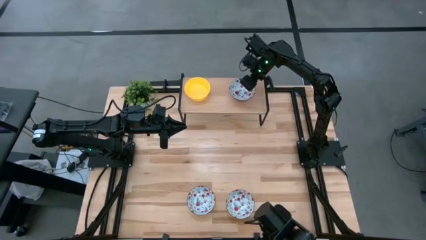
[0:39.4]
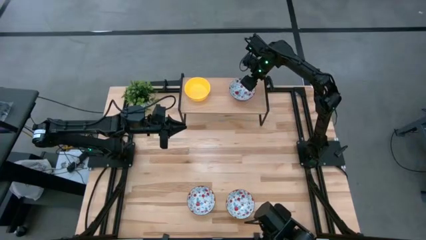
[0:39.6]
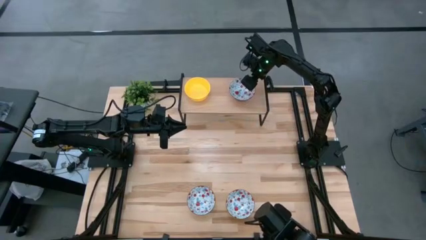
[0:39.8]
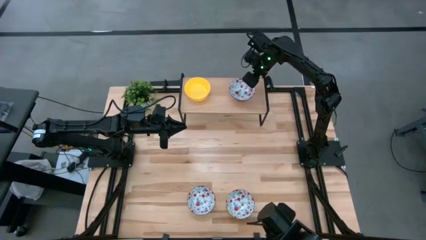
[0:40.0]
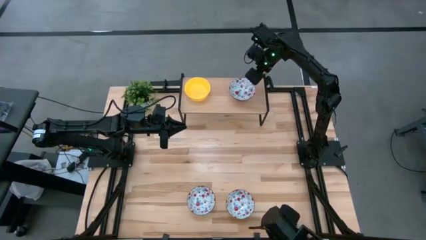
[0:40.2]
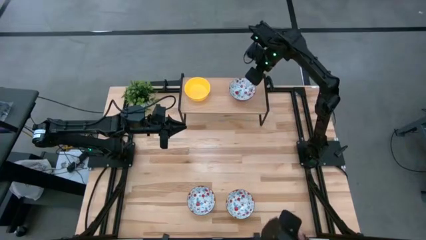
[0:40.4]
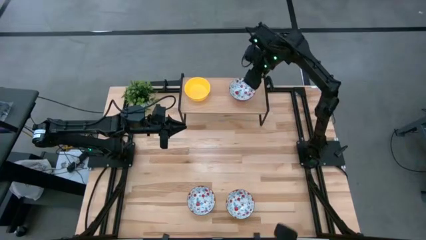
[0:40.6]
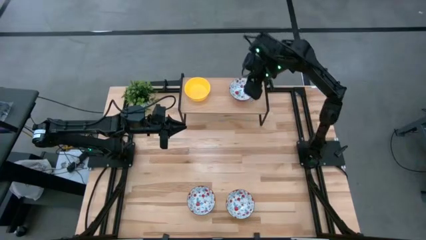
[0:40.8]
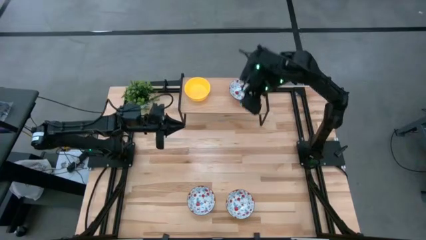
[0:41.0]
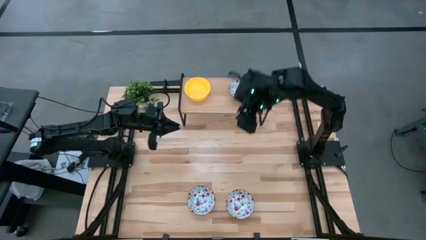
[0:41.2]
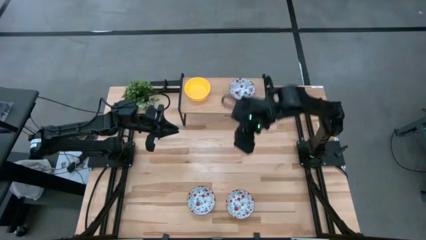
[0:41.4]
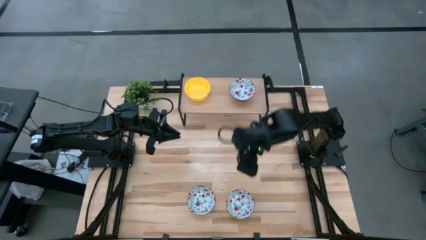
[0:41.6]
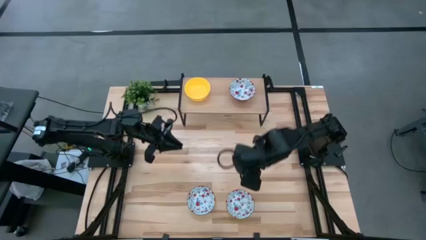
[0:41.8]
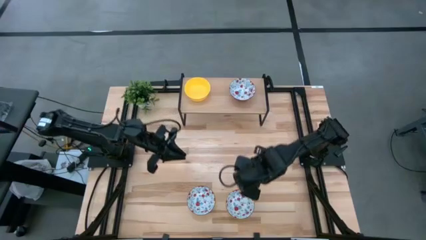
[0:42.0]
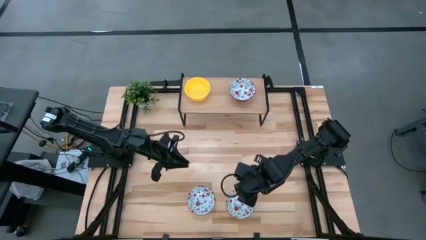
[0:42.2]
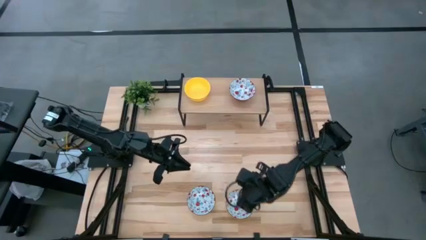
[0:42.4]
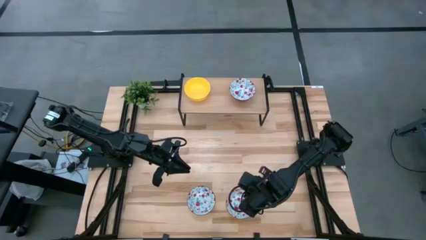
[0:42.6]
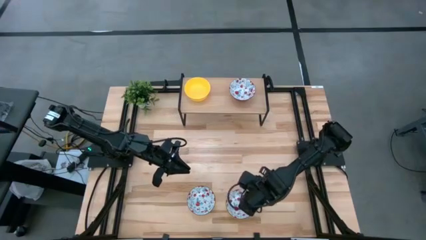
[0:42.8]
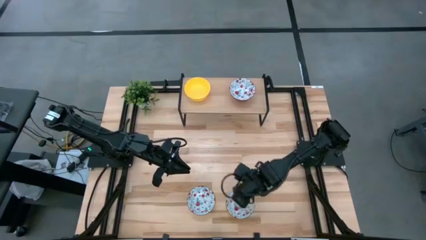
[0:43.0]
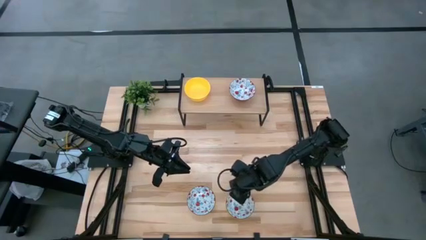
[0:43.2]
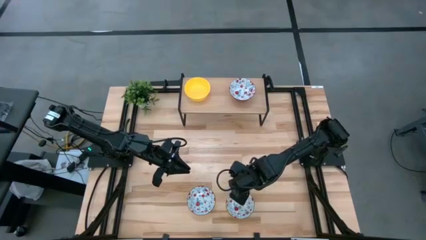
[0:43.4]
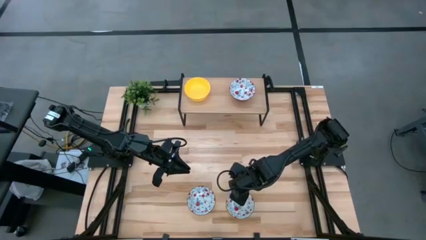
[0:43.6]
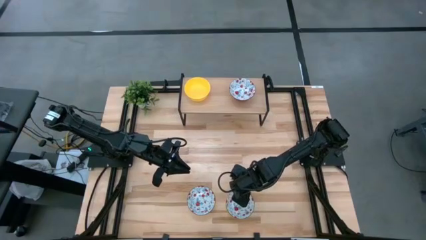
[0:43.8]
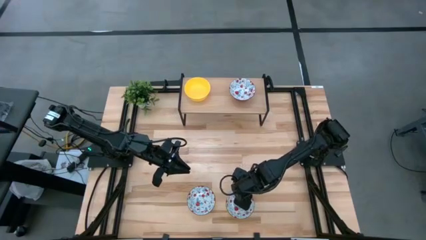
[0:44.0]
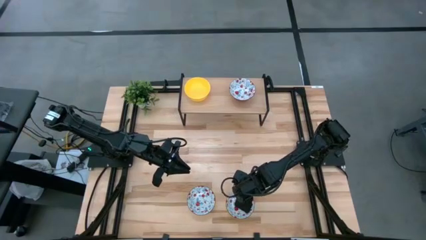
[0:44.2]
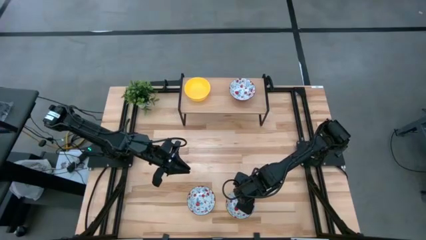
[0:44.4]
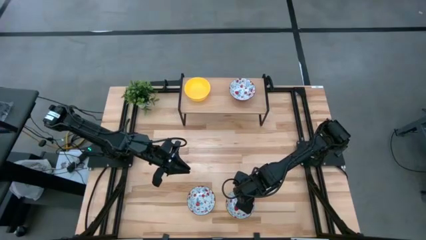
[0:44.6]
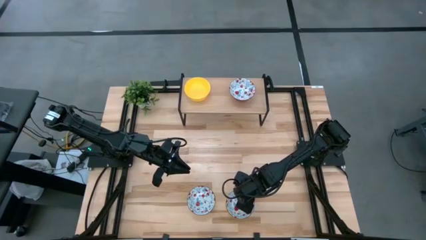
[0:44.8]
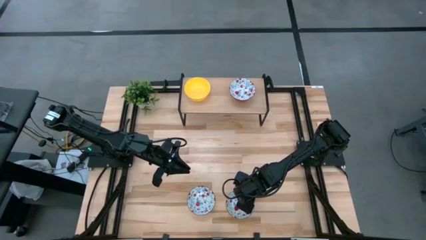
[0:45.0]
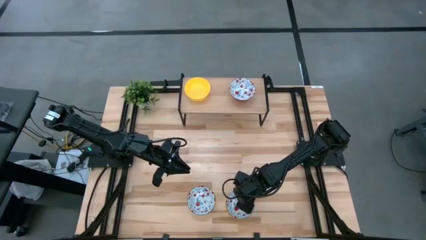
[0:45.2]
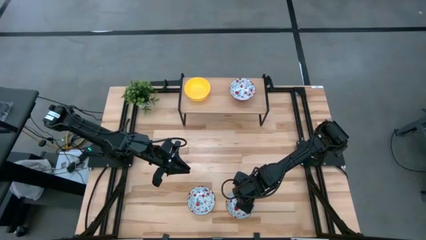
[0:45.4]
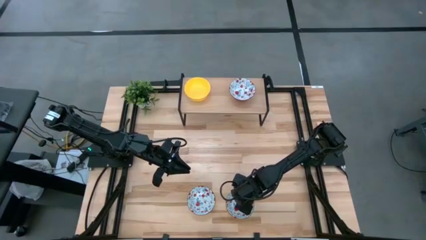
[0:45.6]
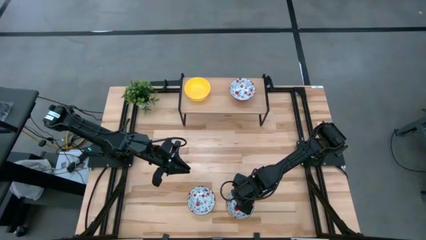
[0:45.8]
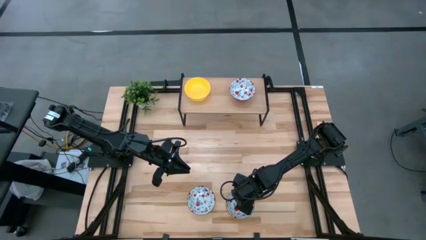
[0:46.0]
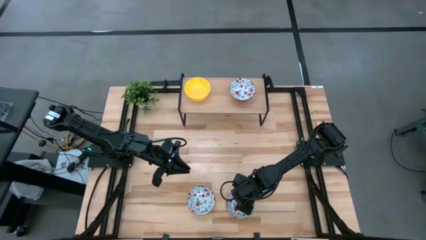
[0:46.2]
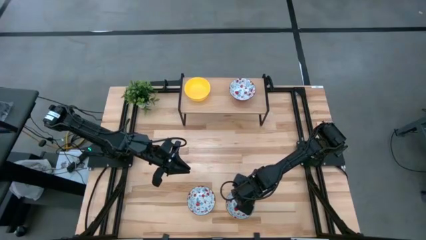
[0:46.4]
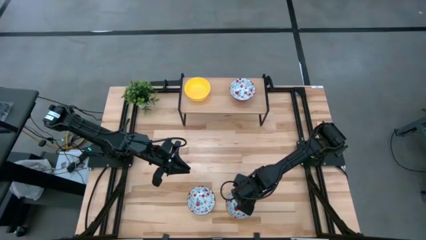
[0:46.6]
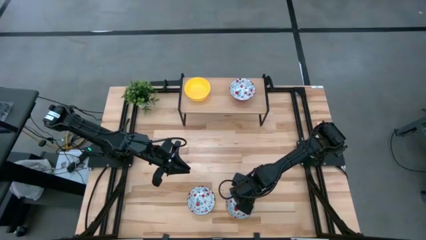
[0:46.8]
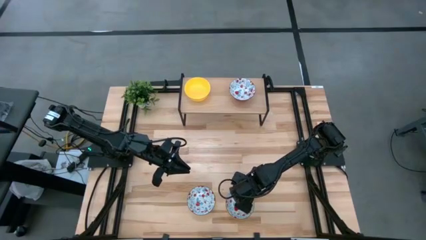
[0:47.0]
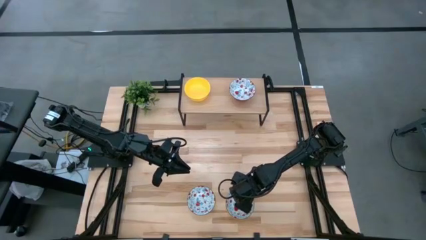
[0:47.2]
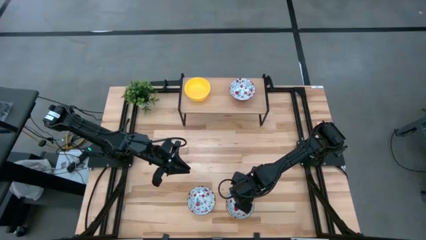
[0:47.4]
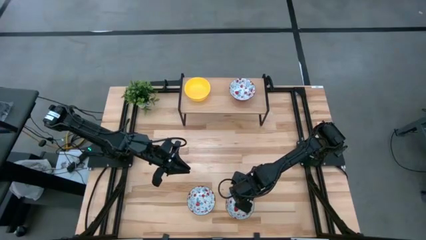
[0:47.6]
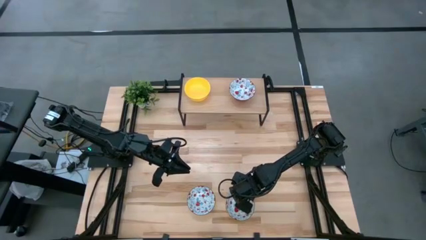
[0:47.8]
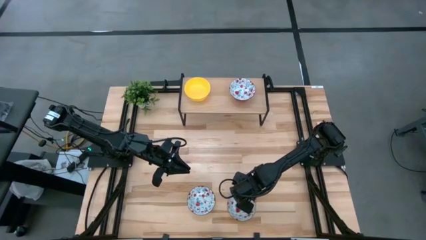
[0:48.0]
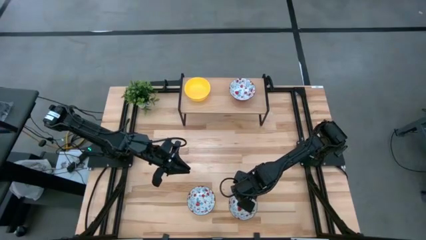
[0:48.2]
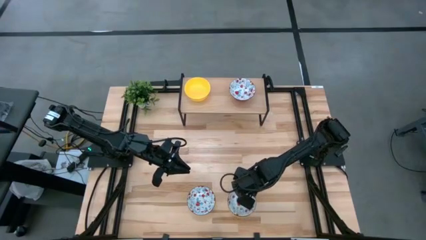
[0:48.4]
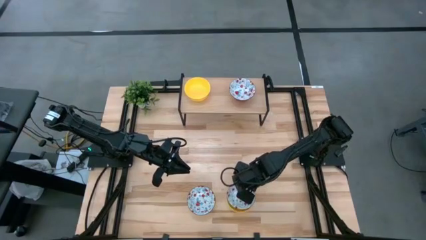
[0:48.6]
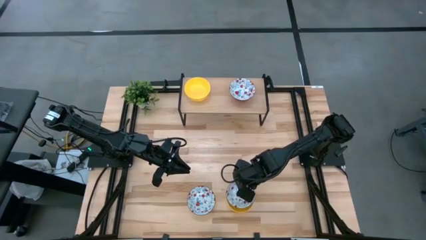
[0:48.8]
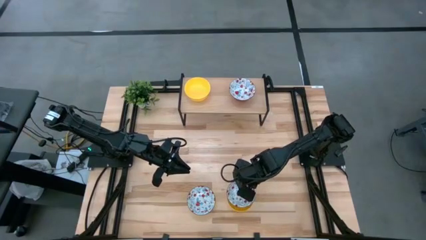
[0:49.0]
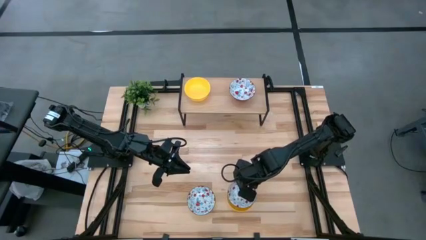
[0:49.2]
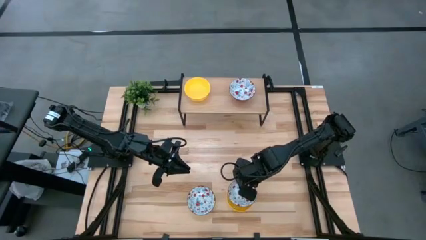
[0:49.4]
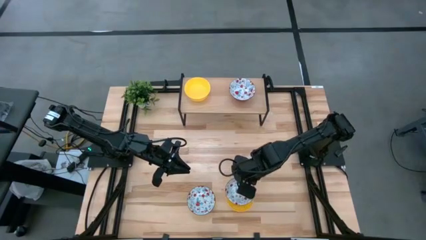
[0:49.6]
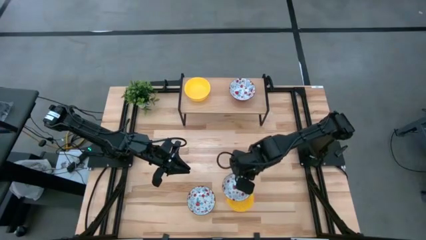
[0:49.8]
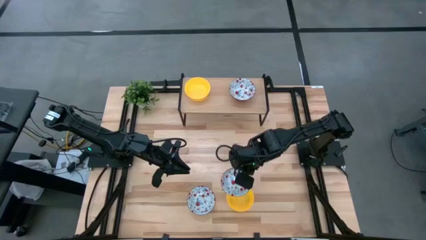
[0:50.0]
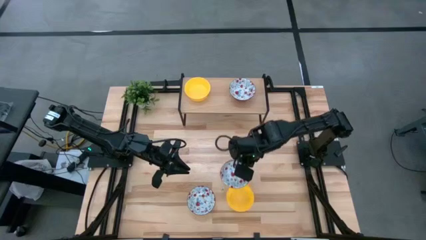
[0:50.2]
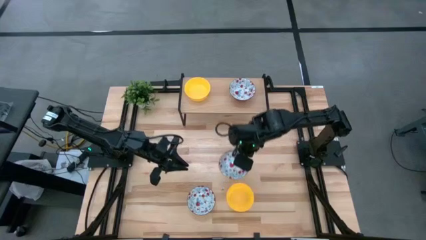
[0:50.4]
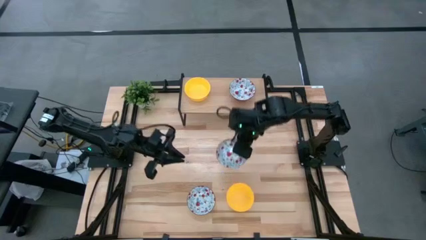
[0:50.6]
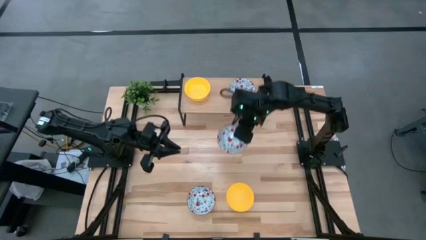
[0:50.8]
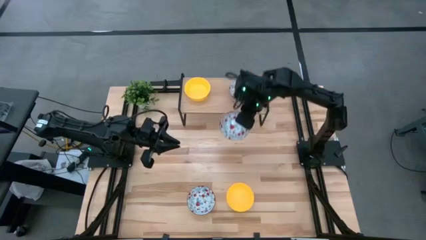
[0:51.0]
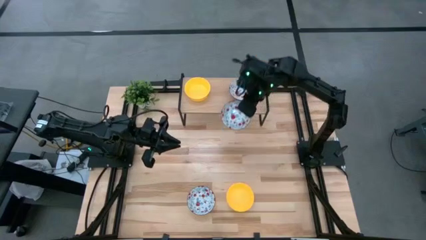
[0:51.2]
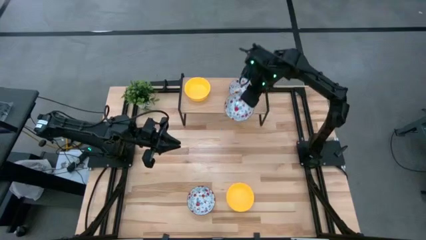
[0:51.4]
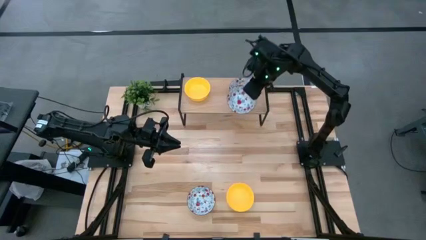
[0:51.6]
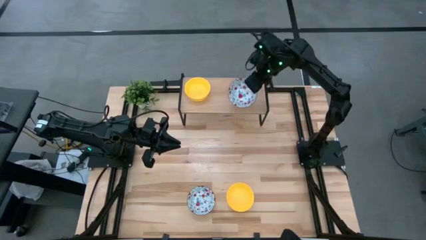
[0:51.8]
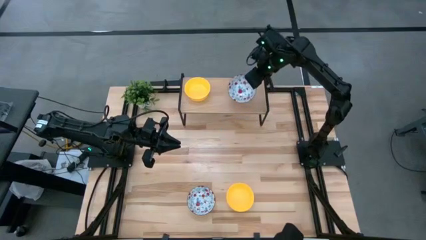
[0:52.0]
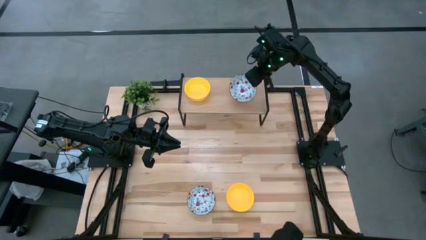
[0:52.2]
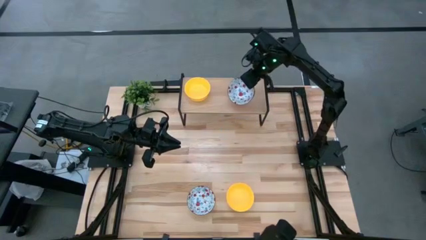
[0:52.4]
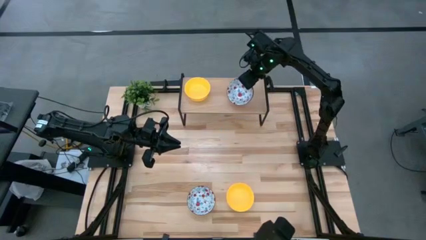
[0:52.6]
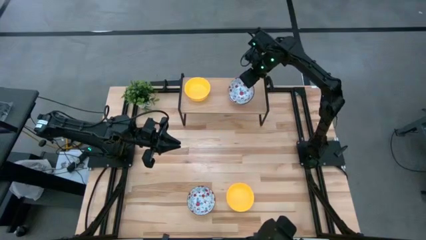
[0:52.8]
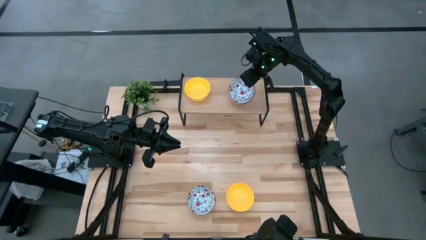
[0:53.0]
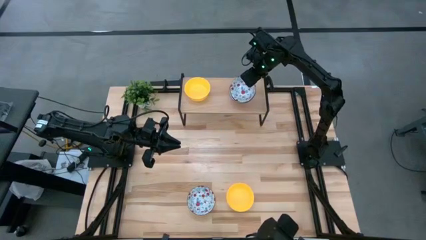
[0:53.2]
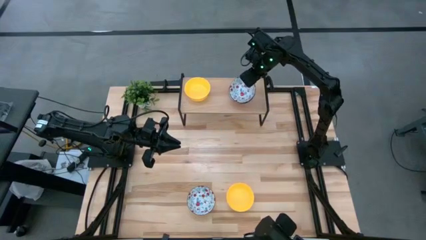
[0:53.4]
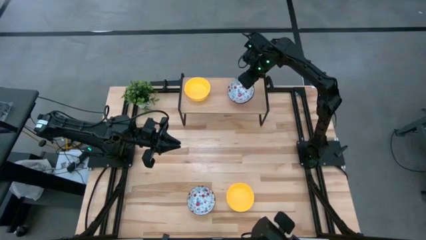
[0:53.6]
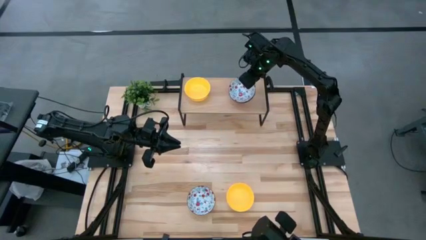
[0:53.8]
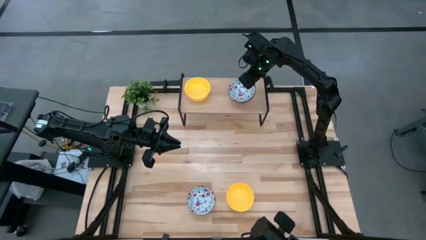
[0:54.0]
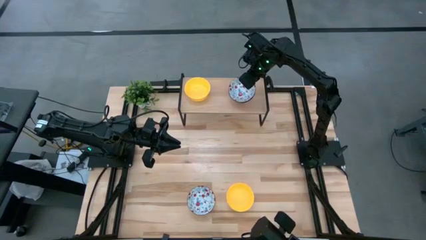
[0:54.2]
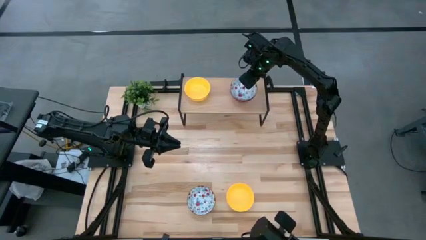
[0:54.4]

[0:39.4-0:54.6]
Task: Pick & Place Mini bowls
Stack the right white bowl on top of the white bowl on the shelf
